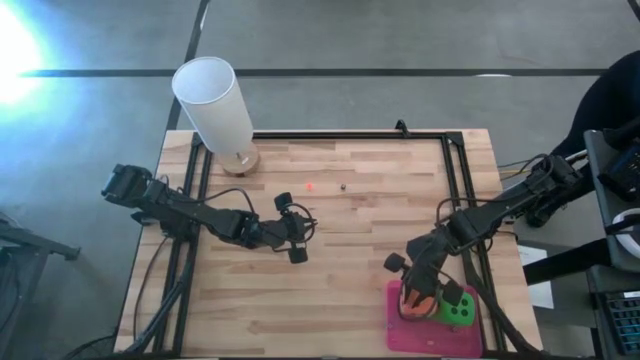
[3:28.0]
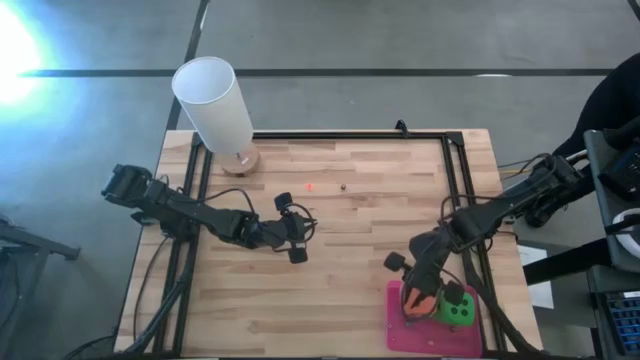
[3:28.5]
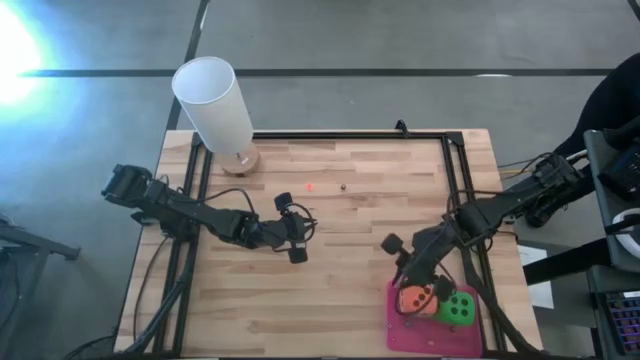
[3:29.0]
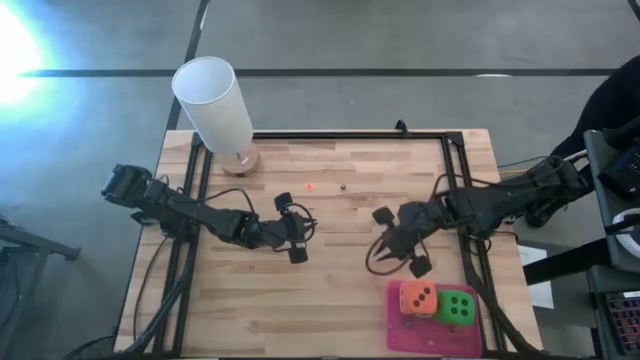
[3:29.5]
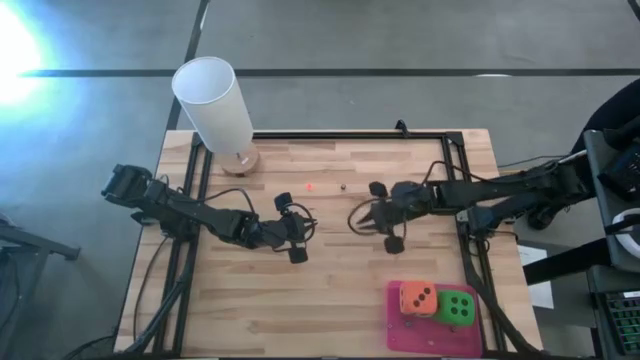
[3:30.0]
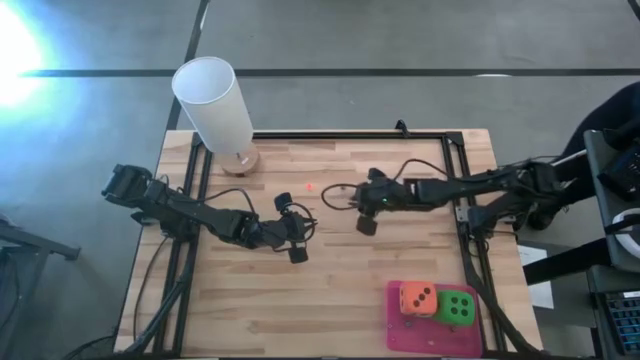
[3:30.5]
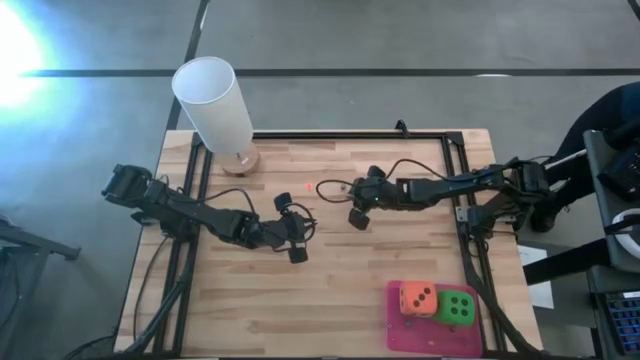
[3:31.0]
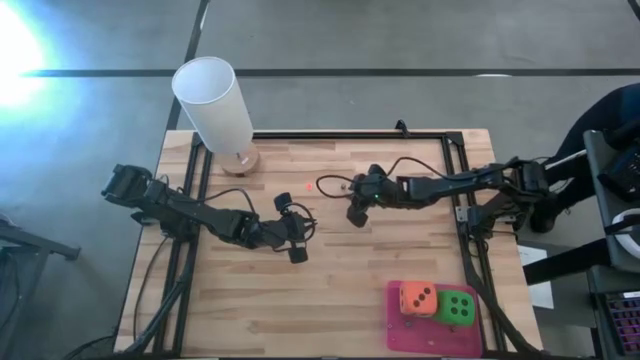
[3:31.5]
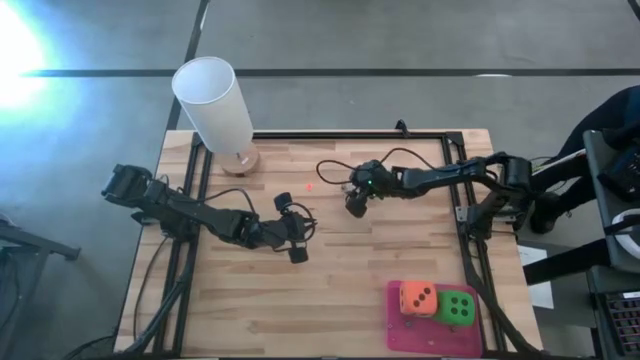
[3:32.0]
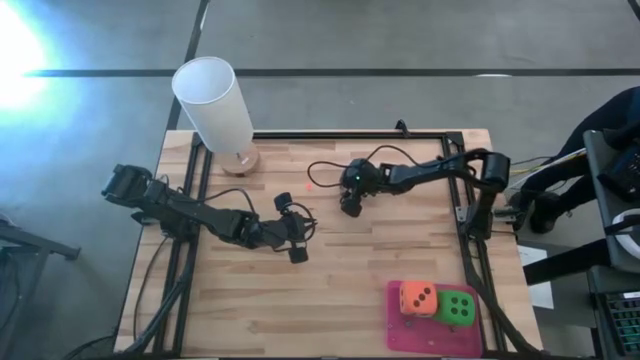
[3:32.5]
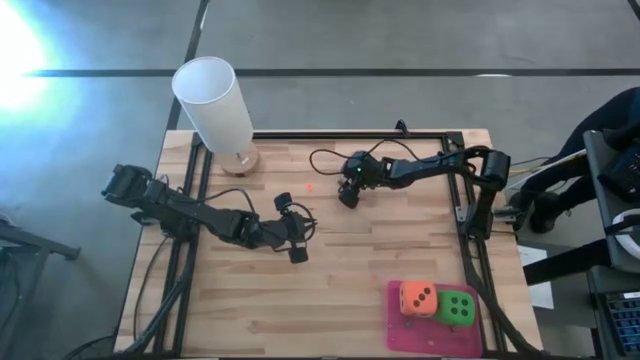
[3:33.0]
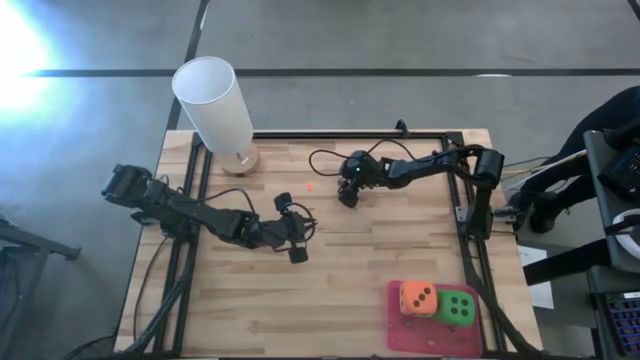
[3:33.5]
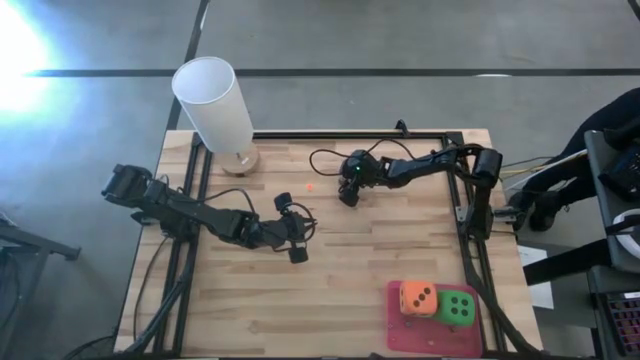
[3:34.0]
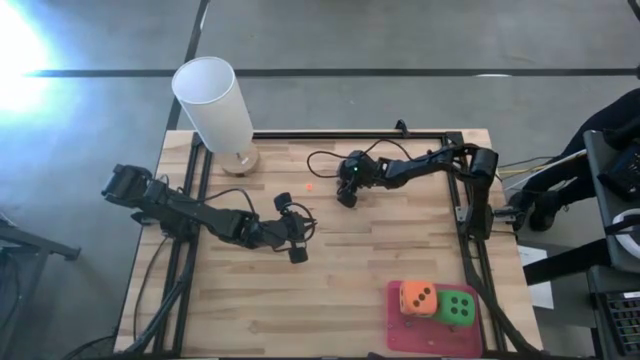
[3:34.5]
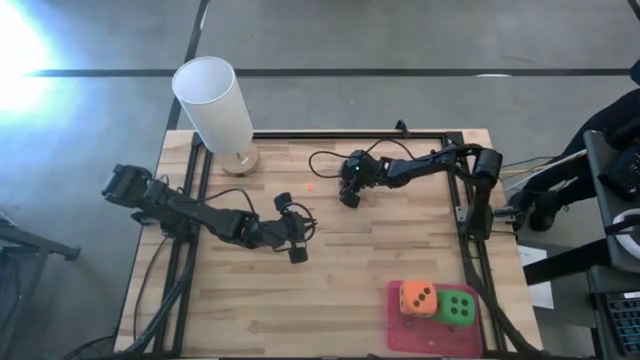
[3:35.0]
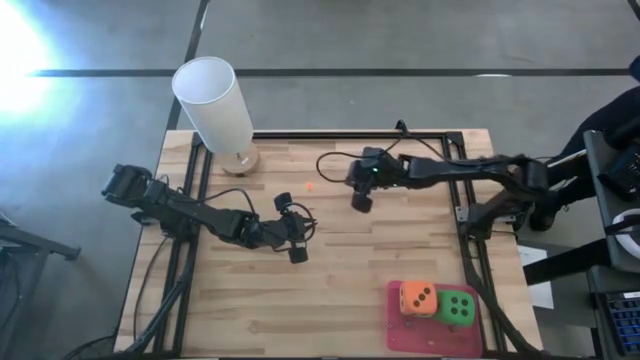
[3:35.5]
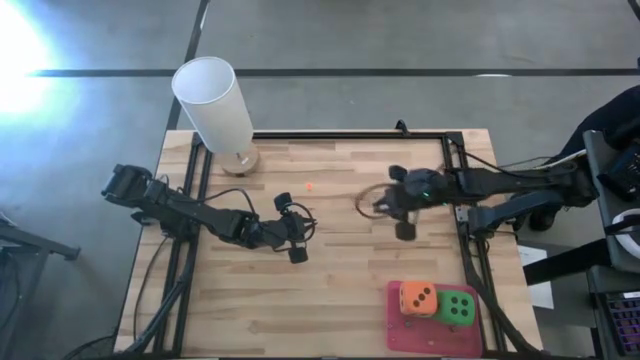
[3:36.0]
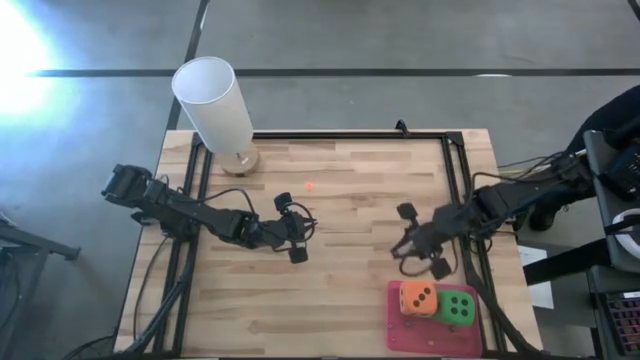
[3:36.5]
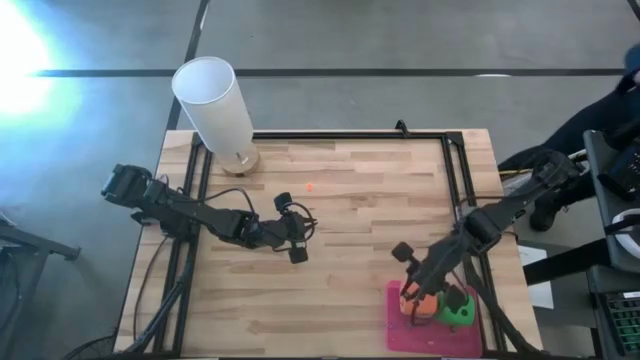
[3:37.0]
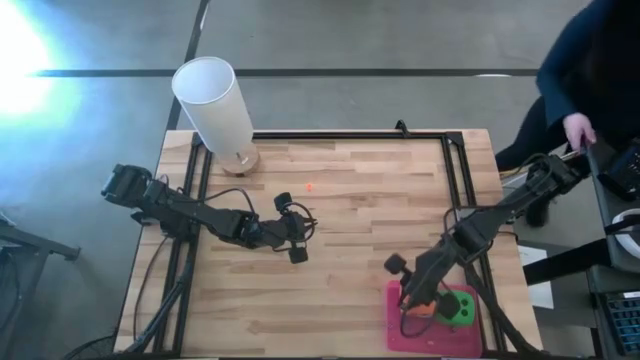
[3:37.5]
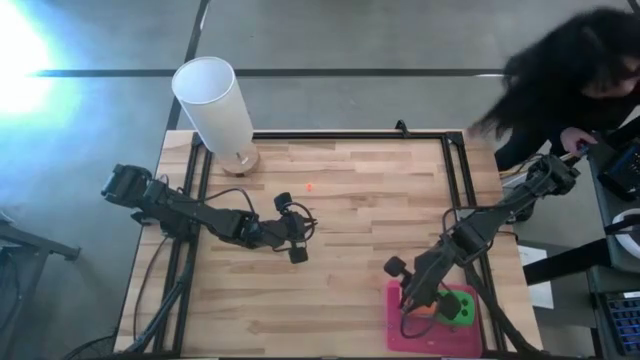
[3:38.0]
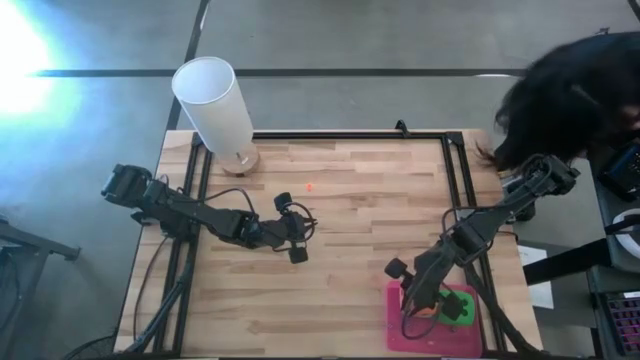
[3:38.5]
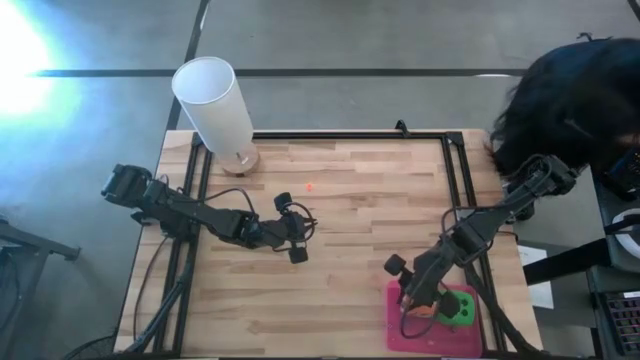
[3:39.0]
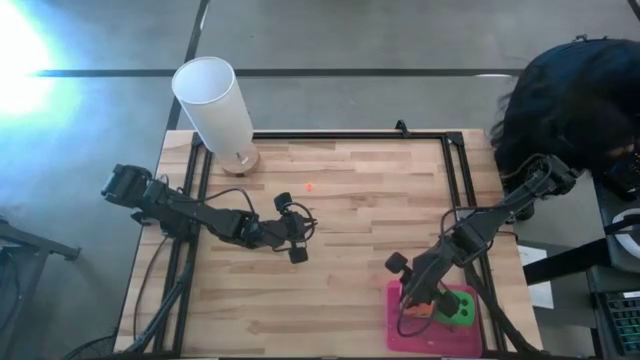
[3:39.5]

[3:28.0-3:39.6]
Task: Pick & Place Dice
Put the small black die into the bin

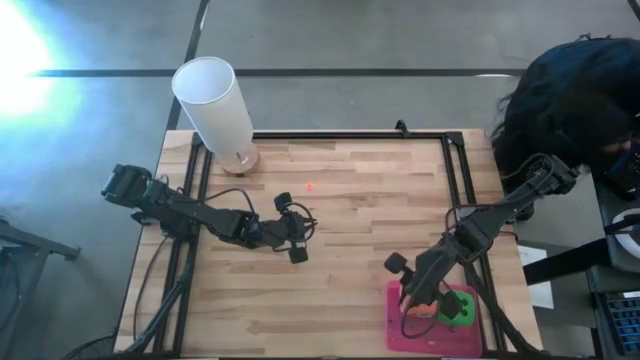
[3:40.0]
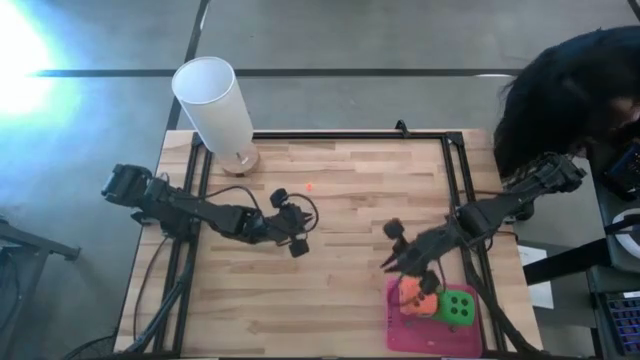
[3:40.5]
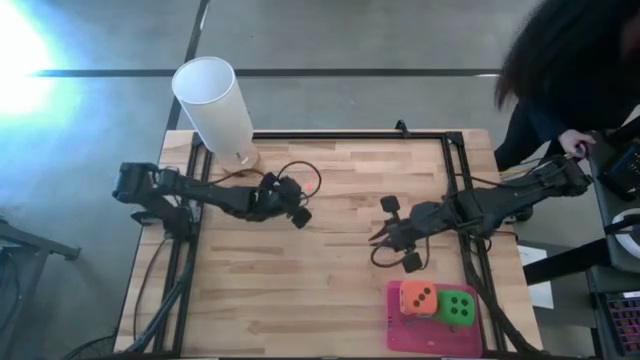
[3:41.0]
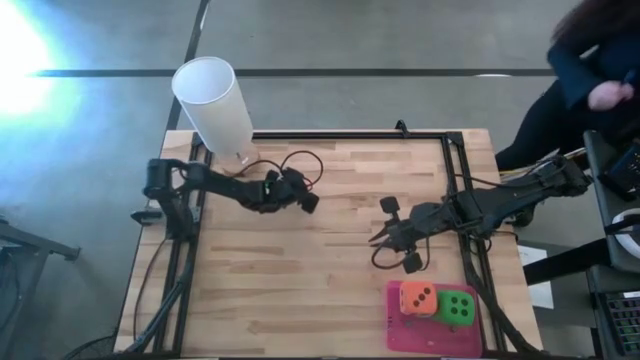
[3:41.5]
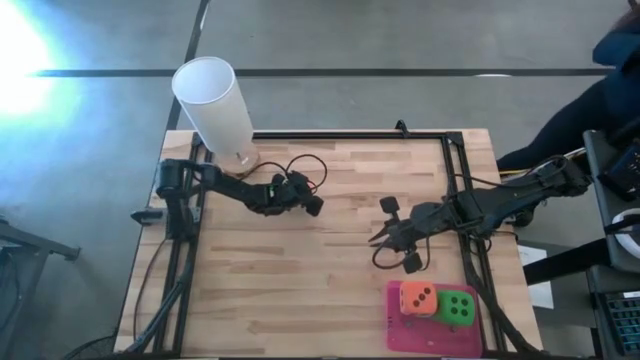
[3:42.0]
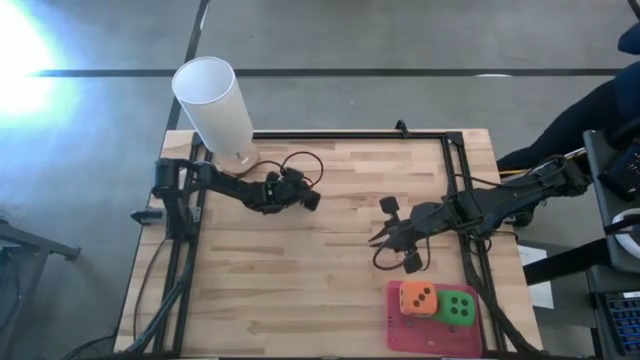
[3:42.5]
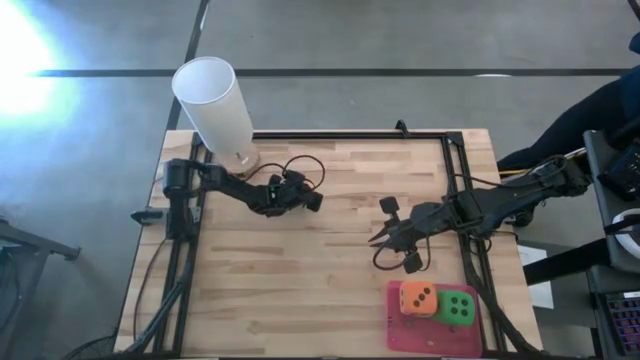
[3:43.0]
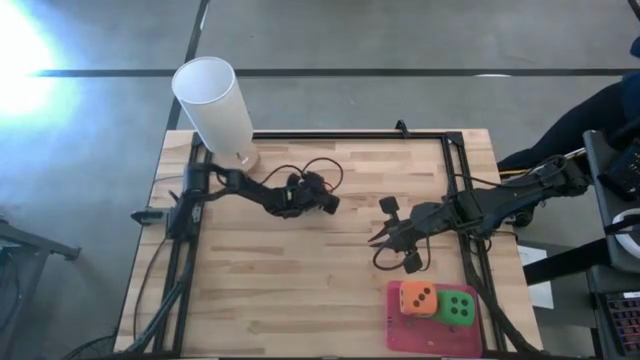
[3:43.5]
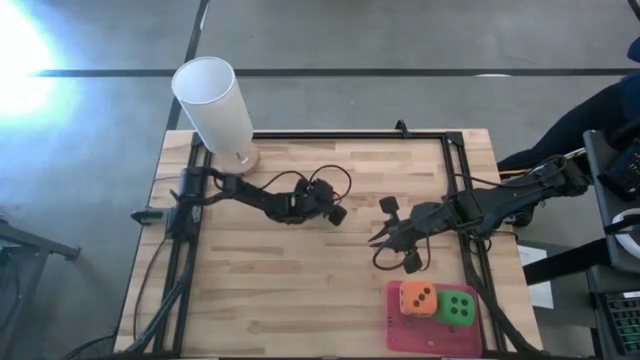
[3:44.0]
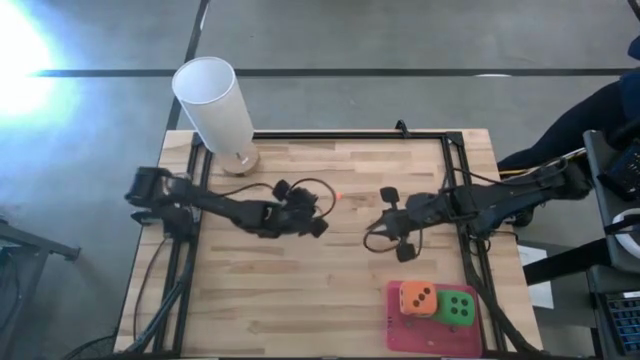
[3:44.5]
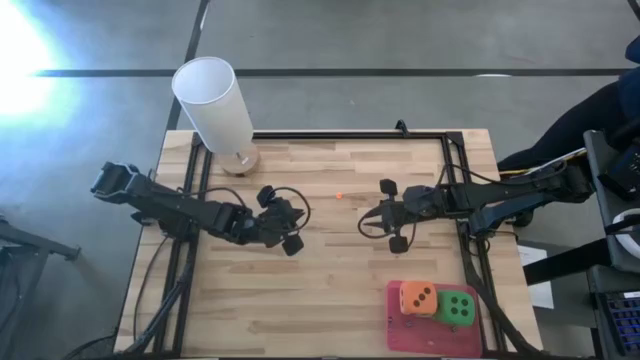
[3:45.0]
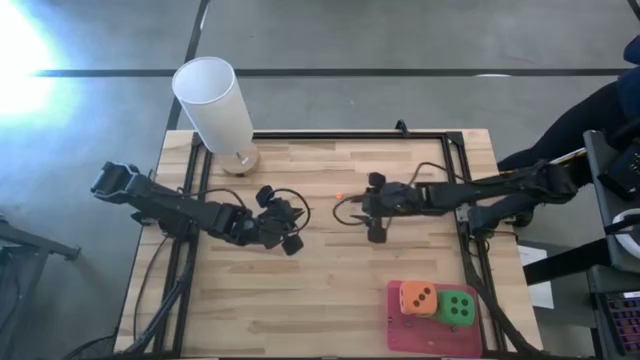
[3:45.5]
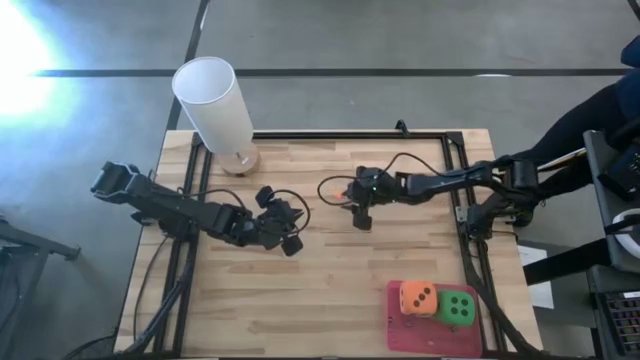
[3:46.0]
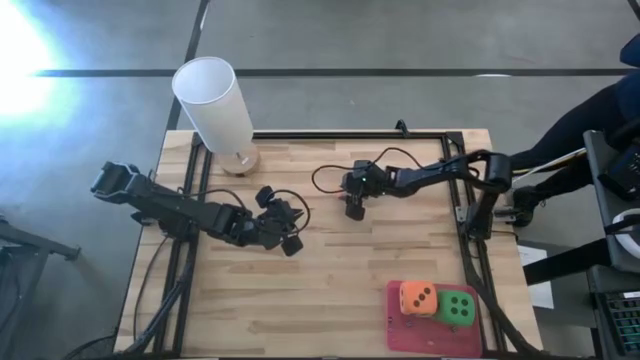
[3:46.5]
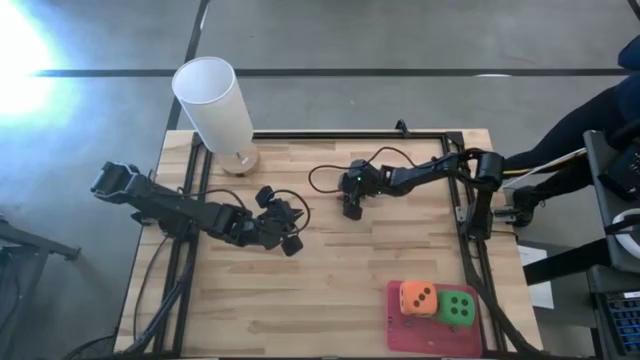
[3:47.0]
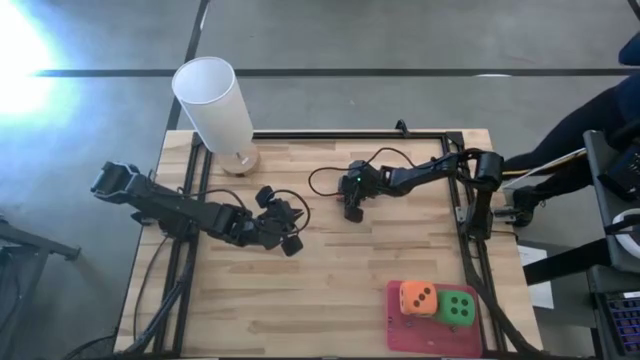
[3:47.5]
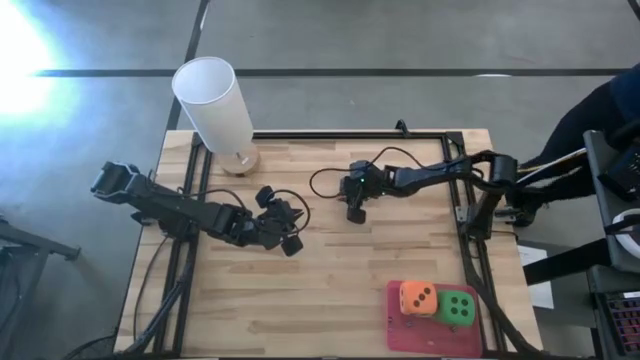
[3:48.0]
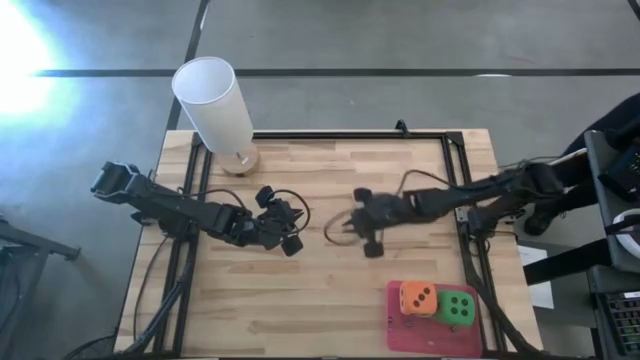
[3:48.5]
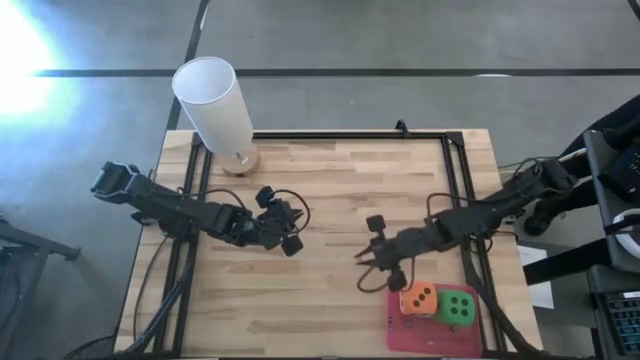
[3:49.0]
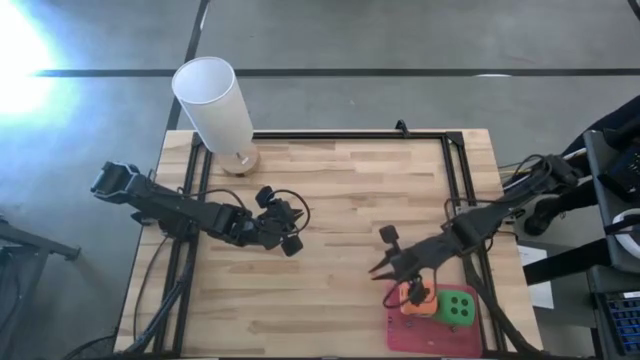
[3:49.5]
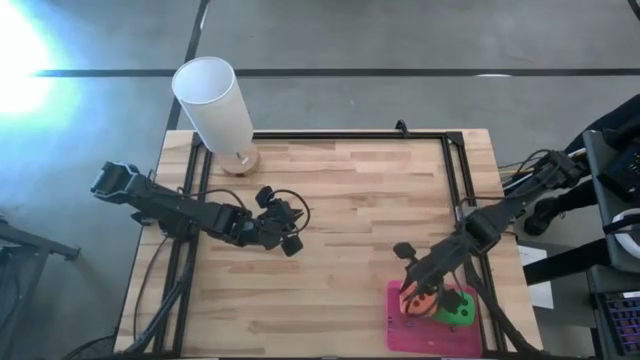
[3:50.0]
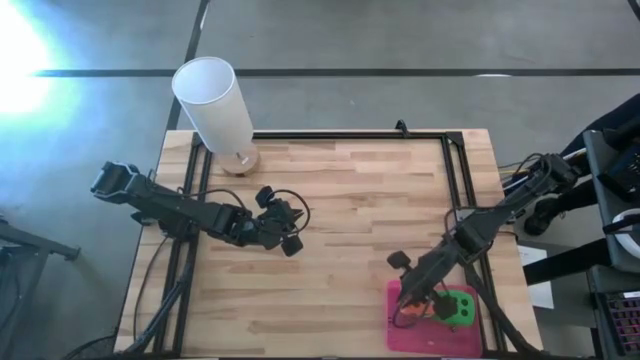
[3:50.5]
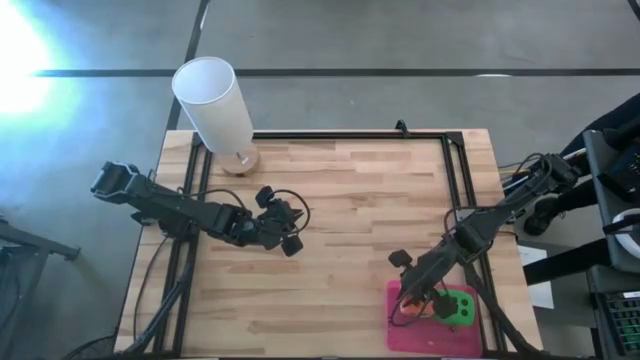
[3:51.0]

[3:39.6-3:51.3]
Put the small orange die into the bin
